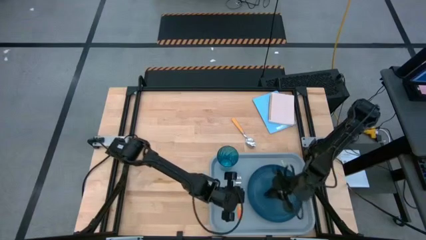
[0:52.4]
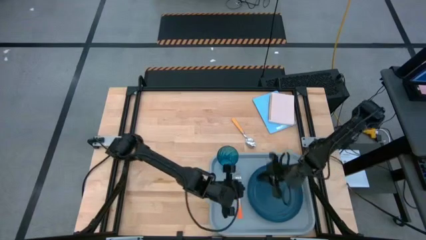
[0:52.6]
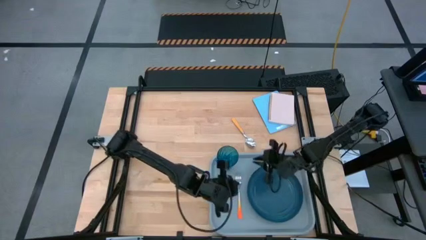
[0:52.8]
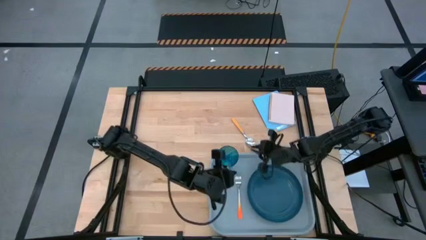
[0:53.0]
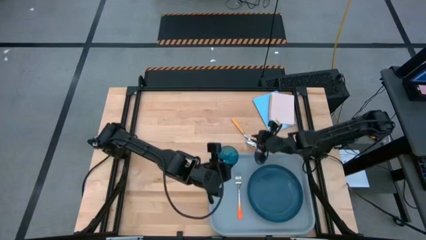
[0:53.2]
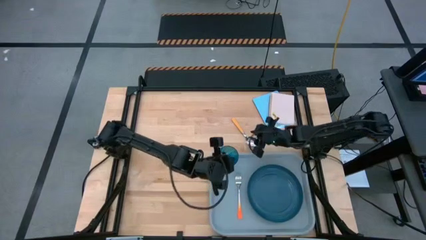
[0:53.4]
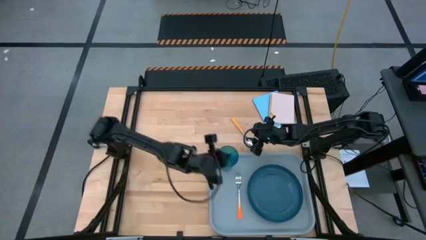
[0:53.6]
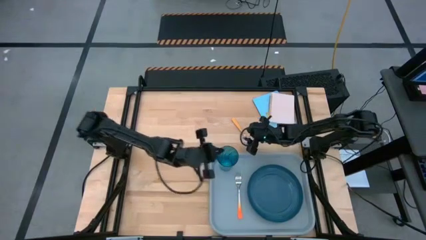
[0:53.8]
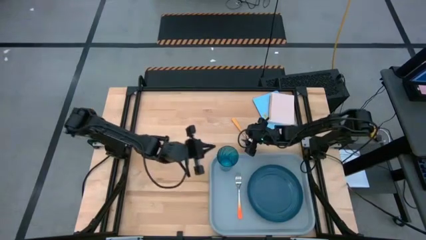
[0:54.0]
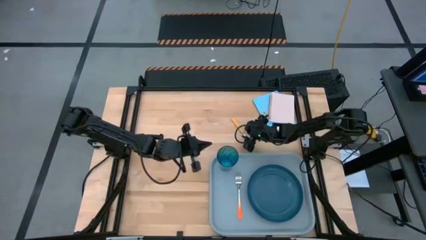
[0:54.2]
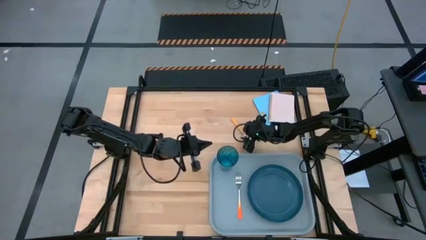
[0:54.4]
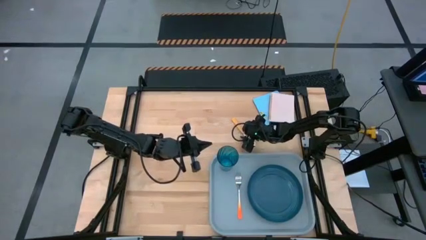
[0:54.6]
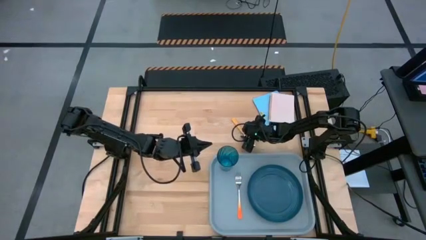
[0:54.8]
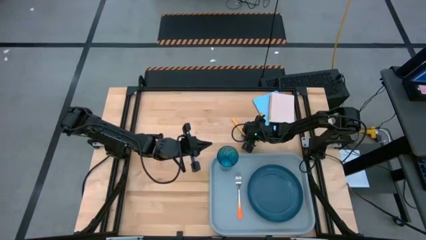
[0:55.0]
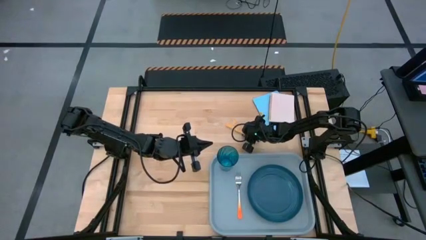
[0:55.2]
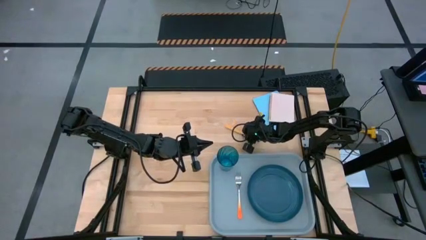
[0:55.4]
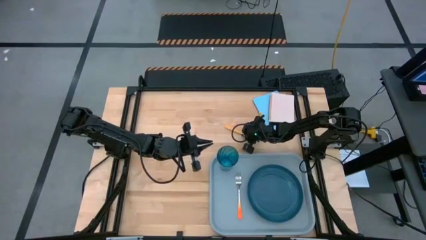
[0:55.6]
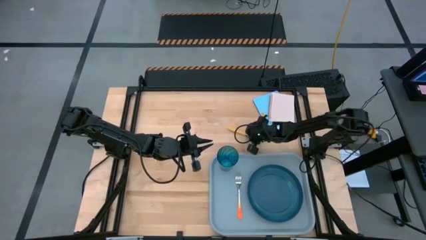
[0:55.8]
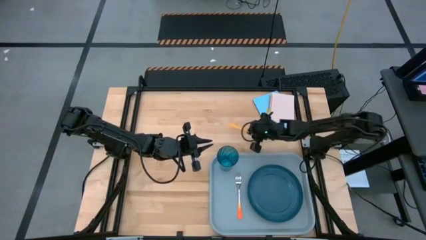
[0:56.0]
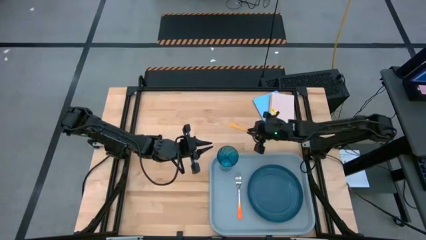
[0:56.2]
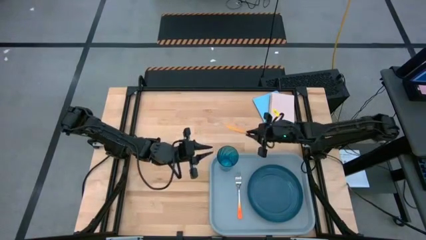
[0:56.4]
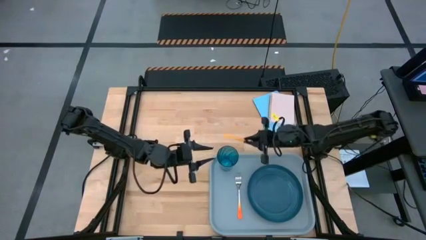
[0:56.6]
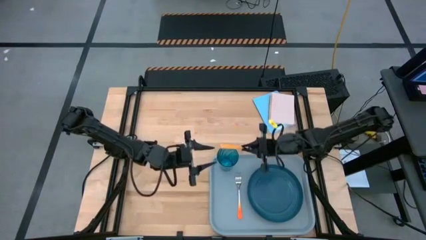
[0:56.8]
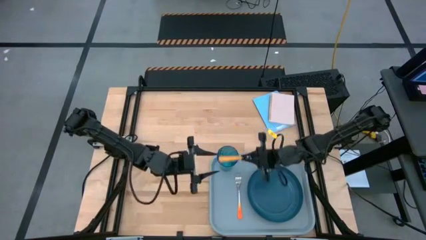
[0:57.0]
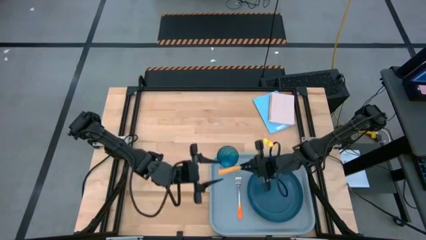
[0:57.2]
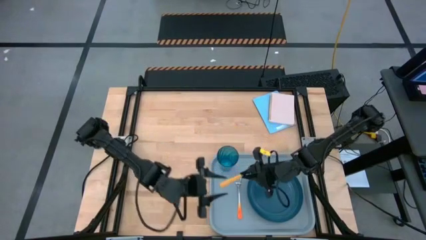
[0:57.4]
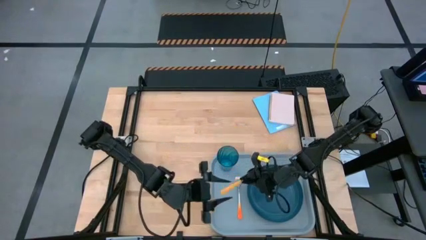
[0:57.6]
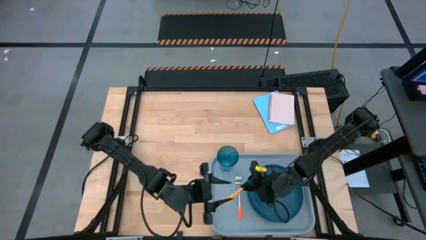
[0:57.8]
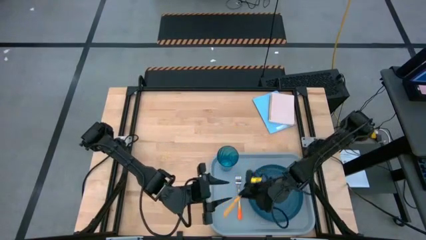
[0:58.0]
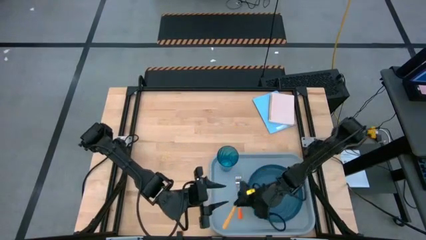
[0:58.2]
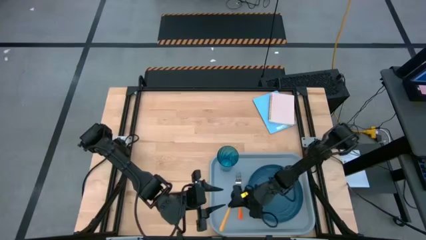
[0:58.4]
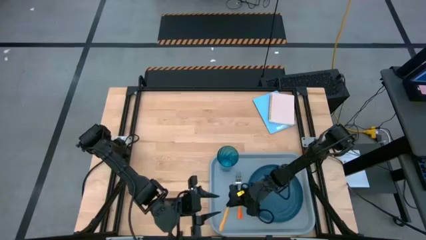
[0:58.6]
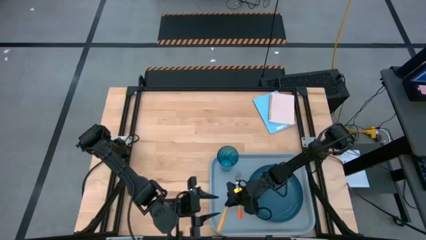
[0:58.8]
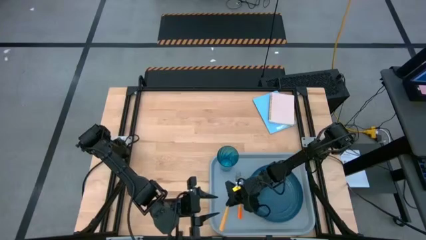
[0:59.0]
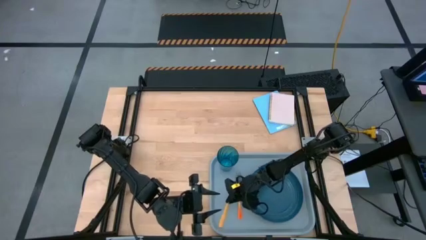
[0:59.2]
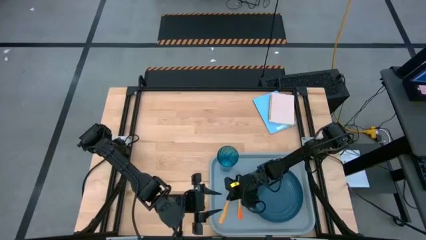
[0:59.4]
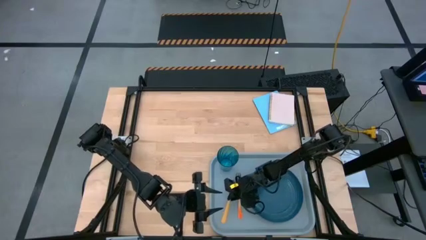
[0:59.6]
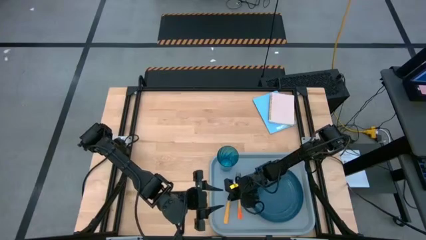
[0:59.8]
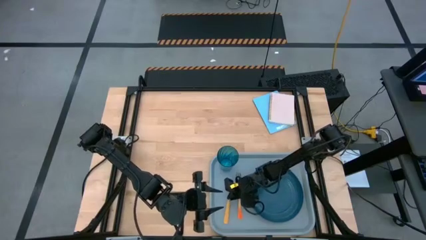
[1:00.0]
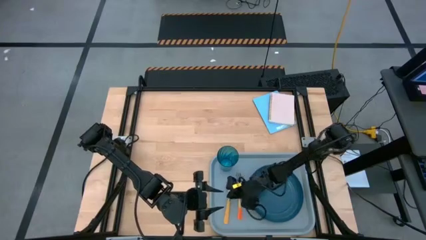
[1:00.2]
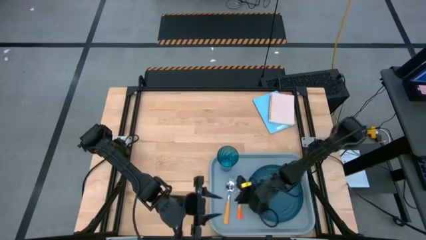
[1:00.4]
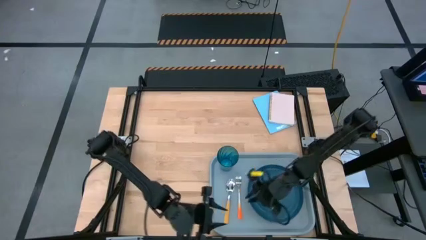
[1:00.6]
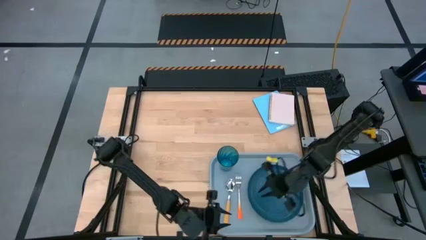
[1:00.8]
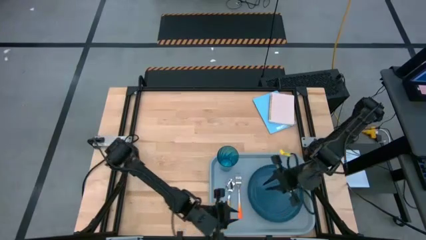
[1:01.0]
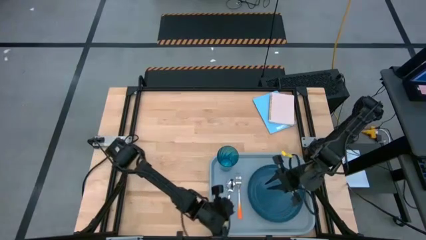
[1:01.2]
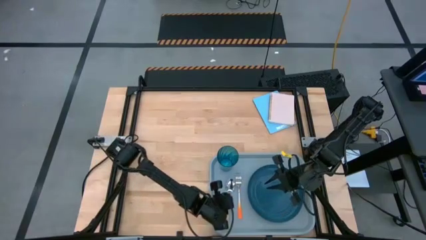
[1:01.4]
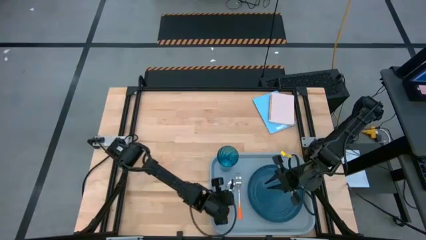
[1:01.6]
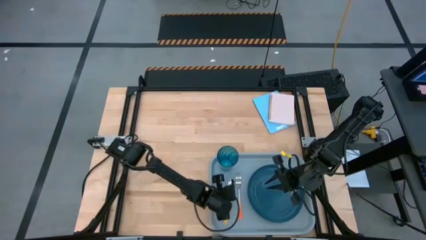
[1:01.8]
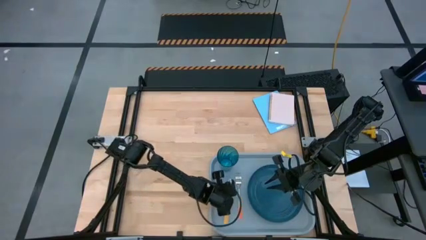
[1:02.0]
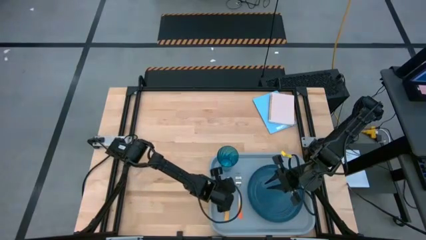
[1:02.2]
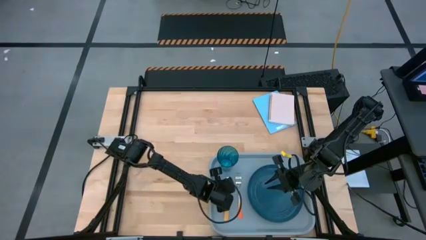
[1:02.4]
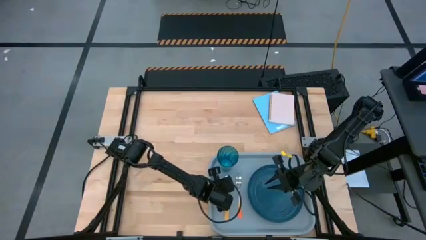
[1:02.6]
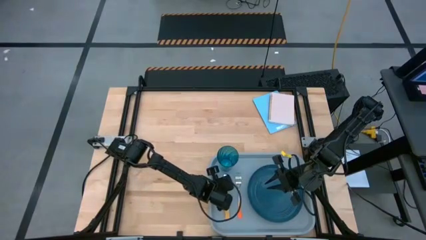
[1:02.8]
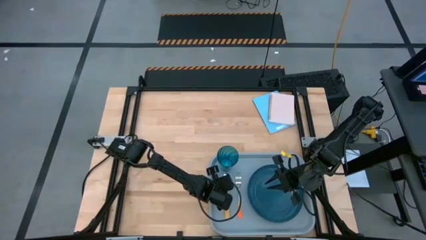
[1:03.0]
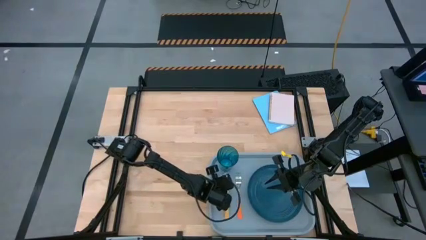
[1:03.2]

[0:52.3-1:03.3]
Task: Pick and place plate/cup/fork/spoon on tray
Put the brown spoon on the gray tray to the left of the orange fork

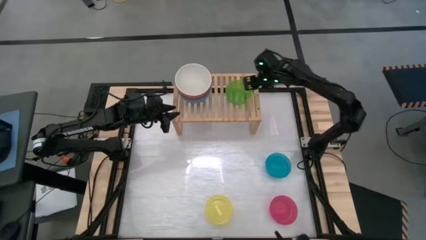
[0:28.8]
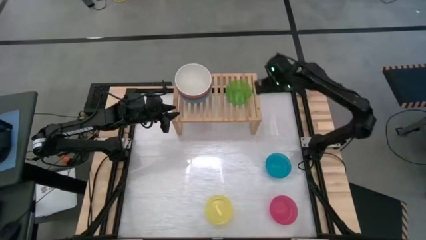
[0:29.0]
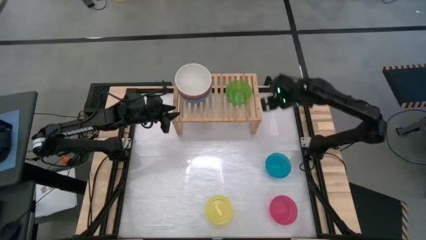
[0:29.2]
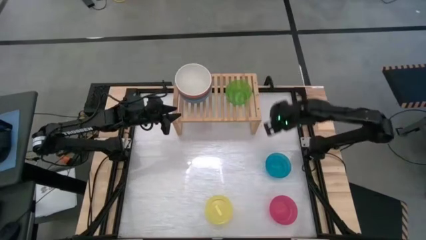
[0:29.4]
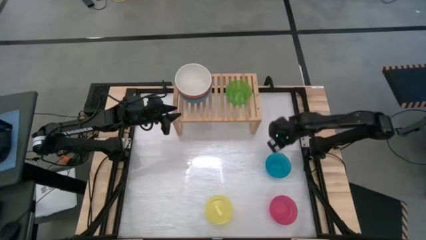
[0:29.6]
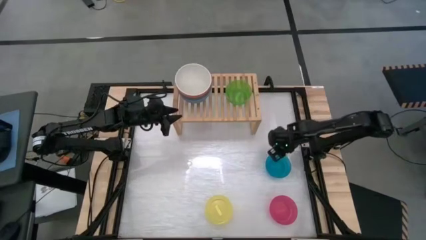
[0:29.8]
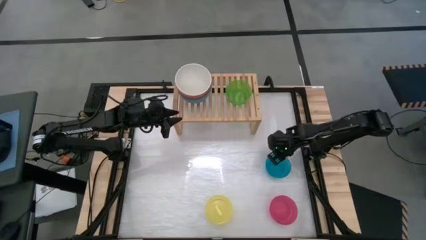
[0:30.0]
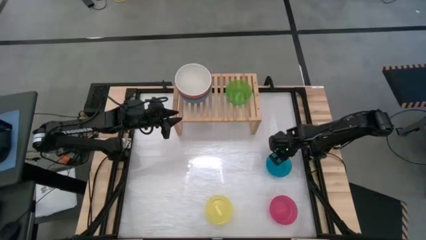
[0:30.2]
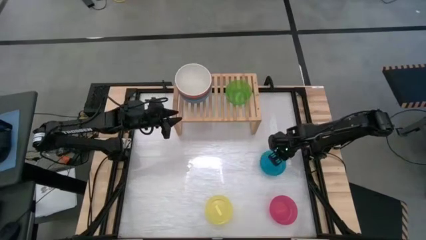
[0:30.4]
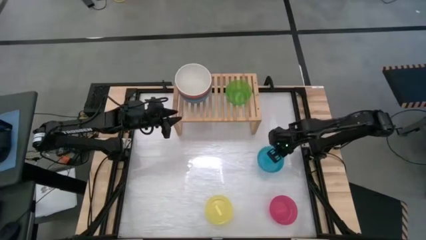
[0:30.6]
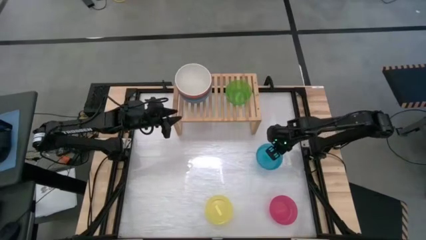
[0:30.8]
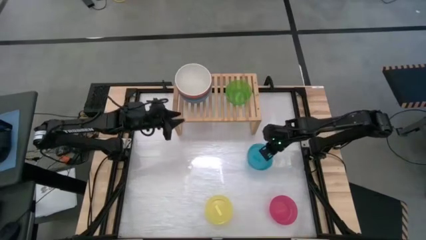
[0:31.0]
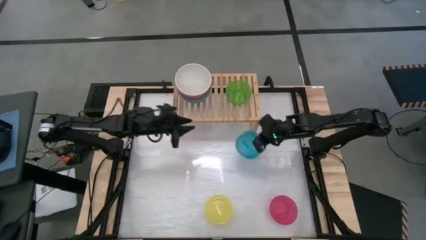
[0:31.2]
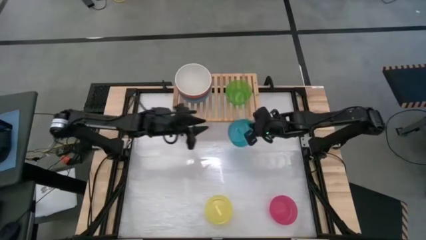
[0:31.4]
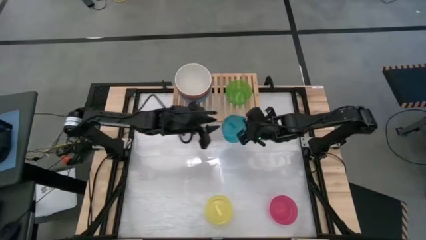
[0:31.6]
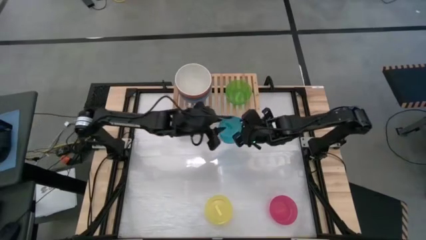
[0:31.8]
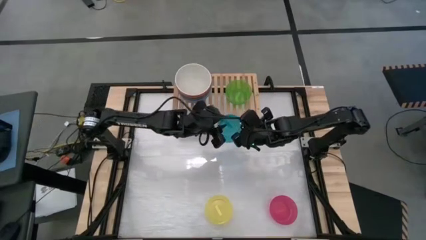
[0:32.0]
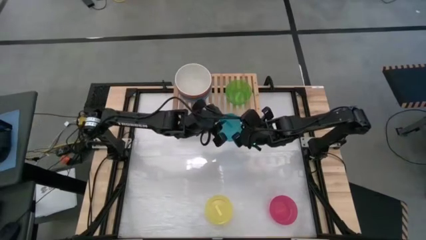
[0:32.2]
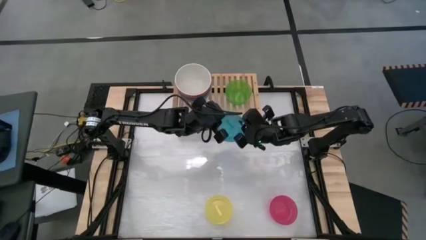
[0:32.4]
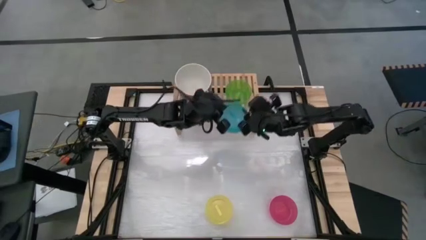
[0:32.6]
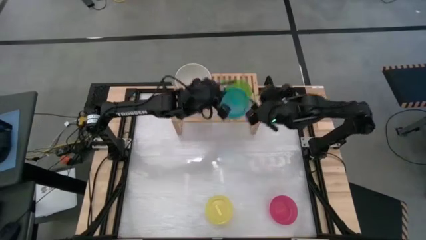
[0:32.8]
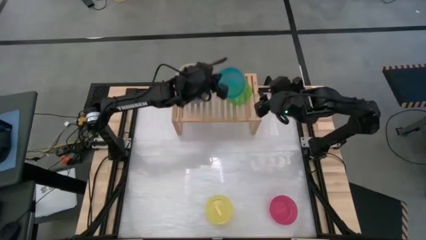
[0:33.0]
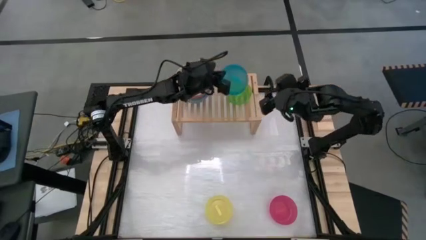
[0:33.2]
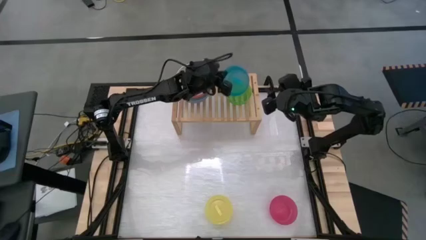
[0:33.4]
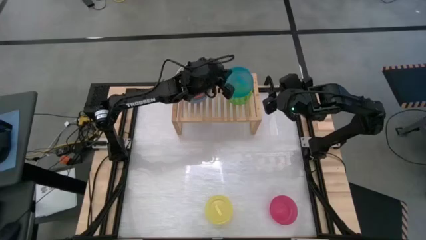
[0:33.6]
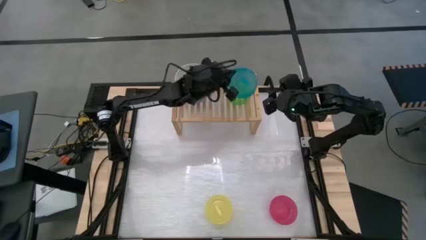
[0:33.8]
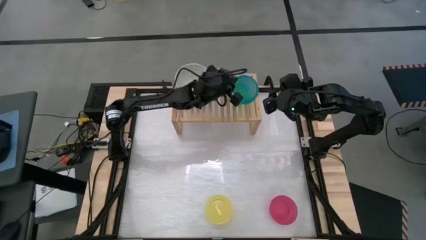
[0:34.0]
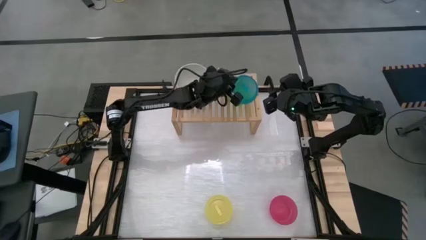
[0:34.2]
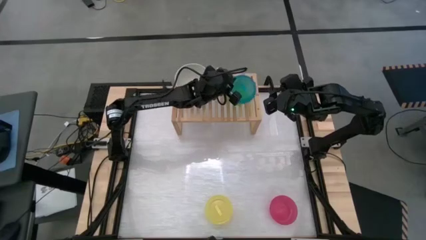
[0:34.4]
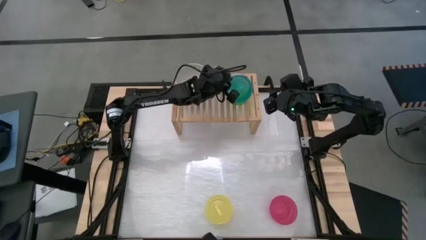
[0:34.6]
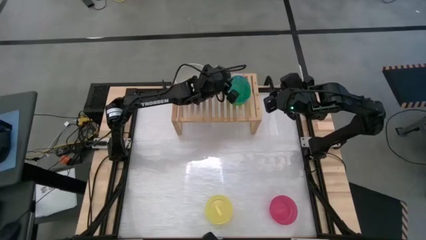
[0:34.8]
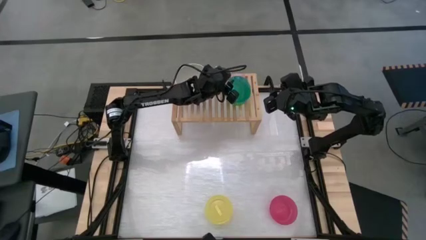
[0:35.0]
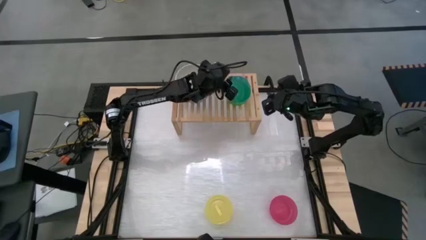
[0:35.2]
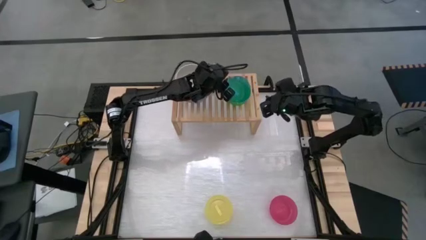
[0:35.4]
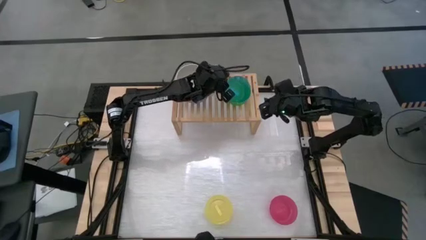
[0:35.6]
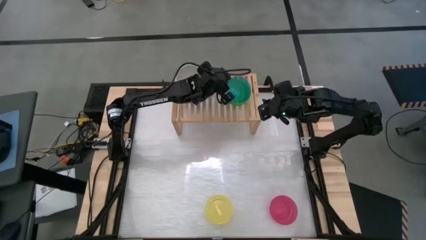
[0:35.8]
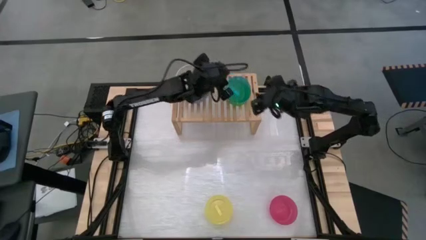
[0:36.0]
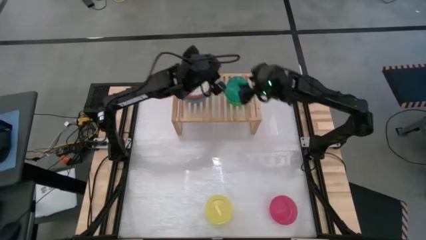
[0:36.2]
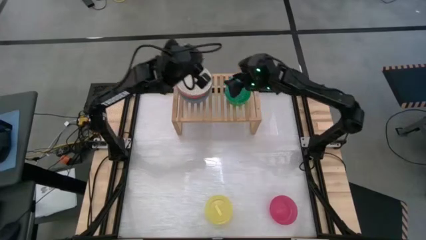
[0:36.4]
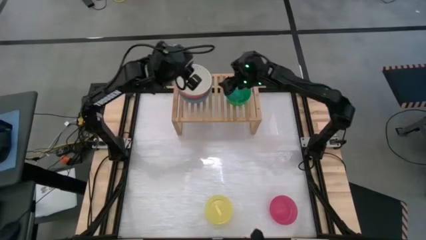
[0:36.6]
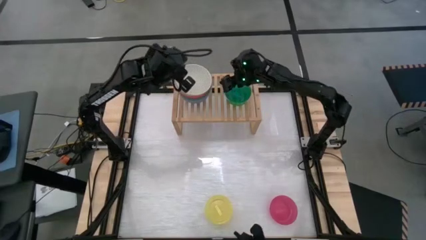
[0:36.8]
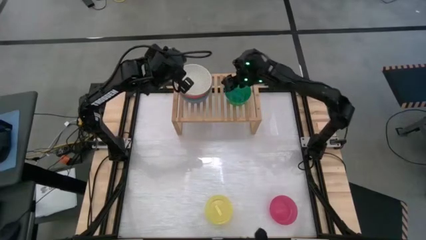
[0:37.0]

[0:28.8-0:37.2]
Task: Place and stack bowls onto a shelf
Stack the blue bowl on the green bowl on the shelf
